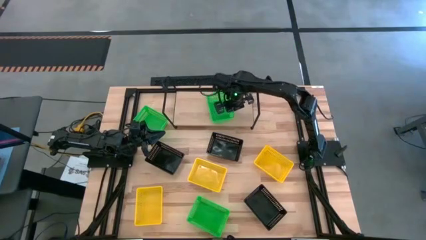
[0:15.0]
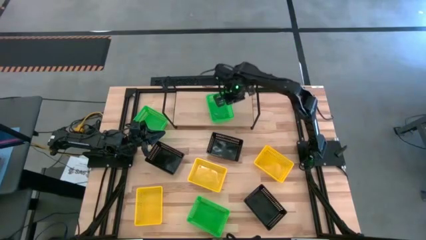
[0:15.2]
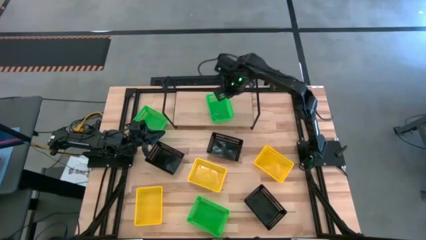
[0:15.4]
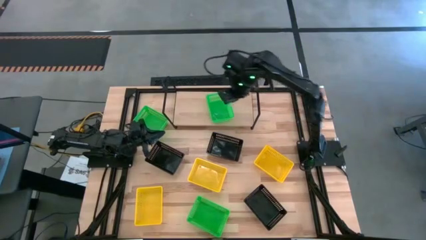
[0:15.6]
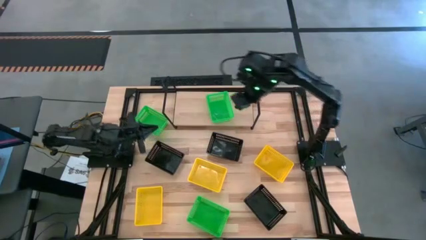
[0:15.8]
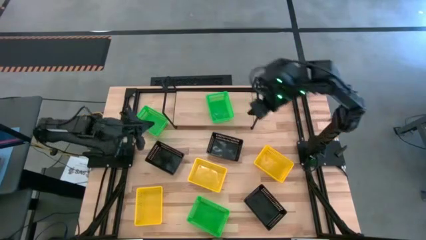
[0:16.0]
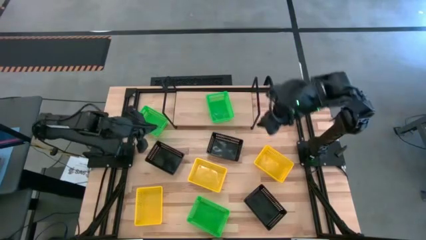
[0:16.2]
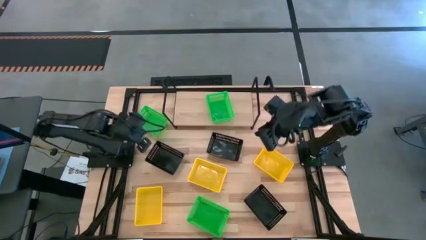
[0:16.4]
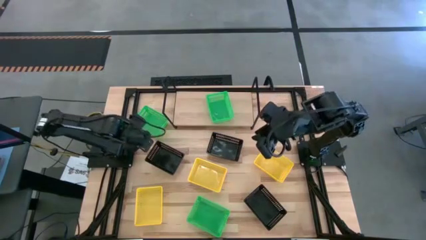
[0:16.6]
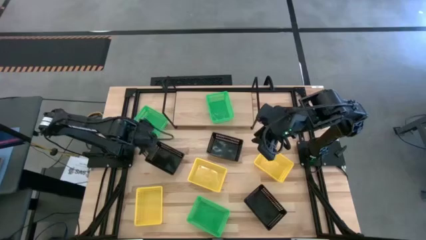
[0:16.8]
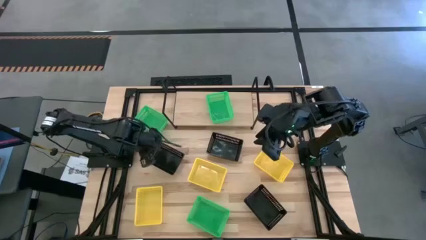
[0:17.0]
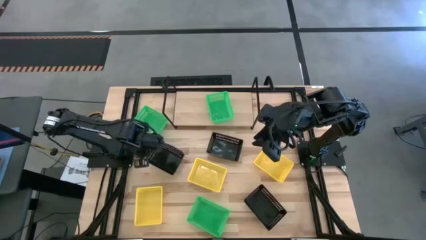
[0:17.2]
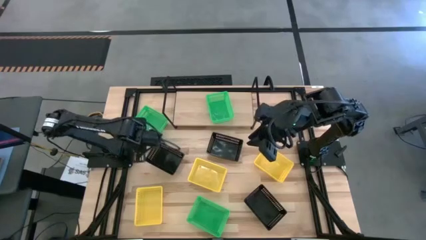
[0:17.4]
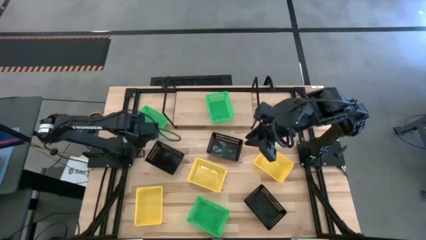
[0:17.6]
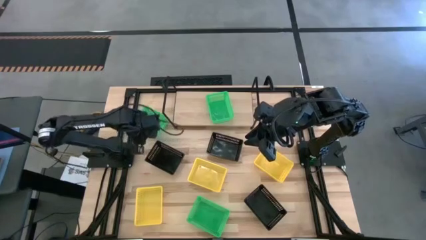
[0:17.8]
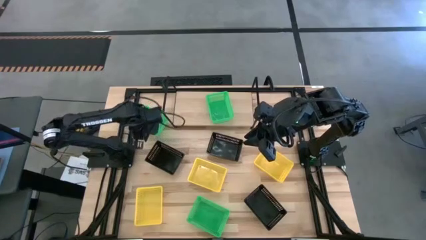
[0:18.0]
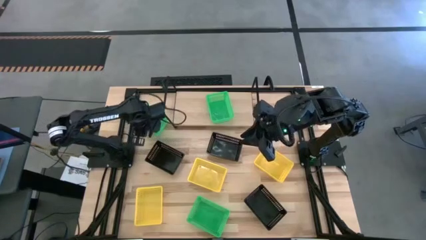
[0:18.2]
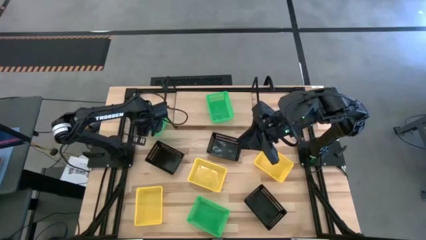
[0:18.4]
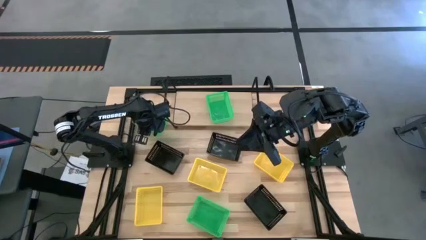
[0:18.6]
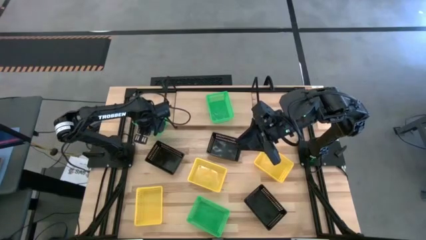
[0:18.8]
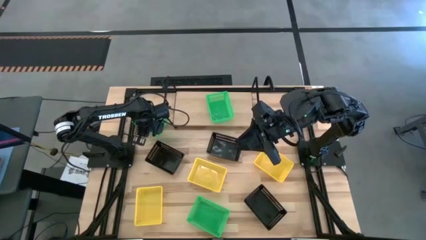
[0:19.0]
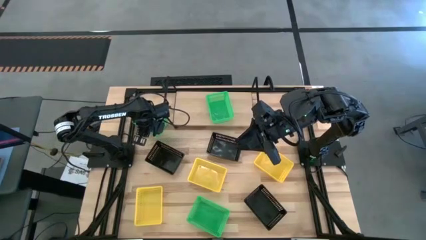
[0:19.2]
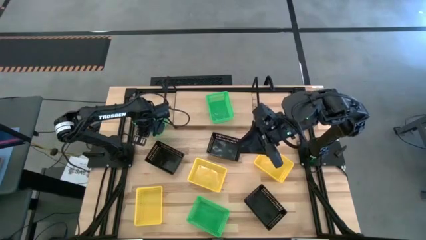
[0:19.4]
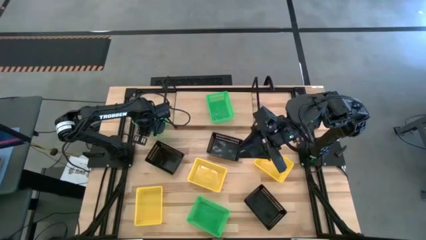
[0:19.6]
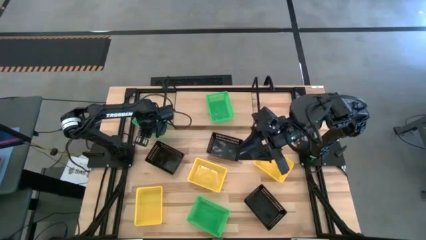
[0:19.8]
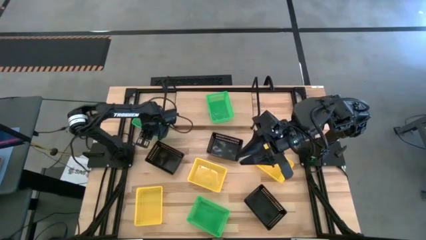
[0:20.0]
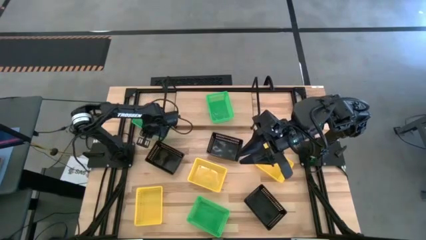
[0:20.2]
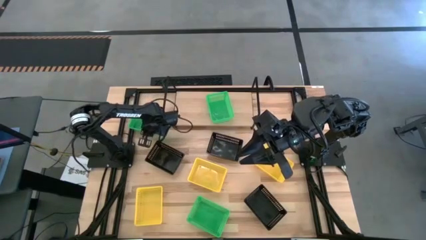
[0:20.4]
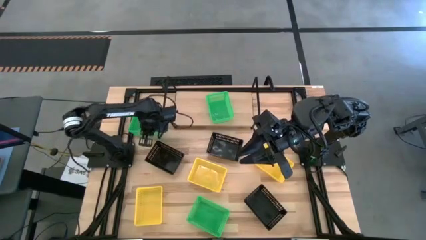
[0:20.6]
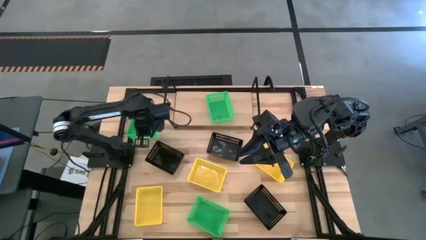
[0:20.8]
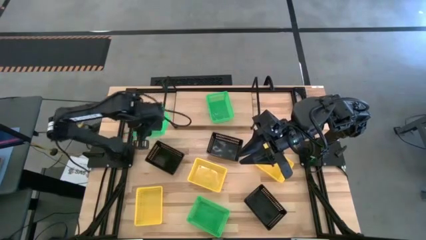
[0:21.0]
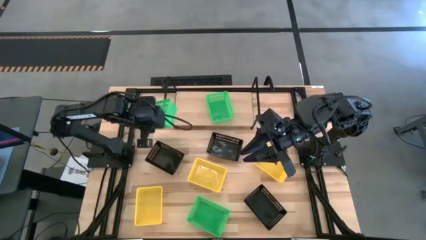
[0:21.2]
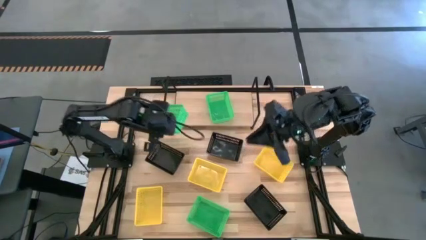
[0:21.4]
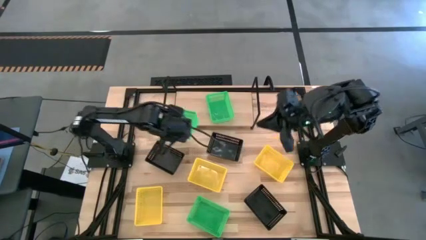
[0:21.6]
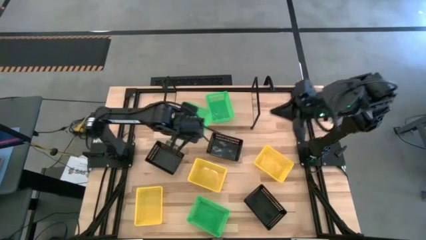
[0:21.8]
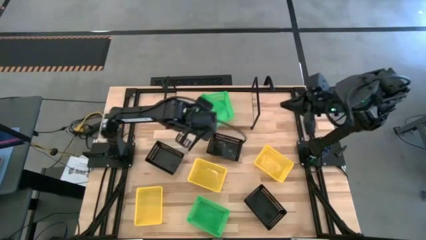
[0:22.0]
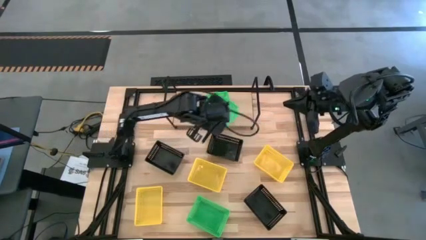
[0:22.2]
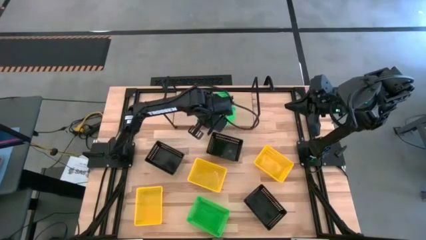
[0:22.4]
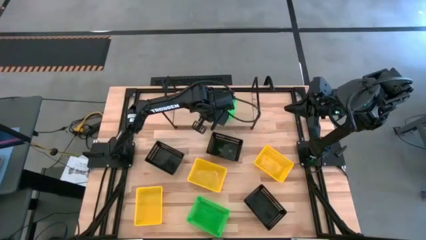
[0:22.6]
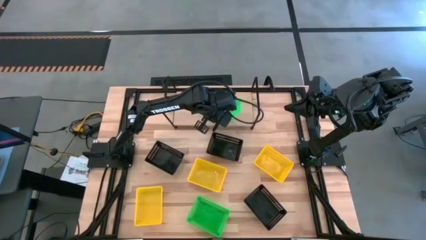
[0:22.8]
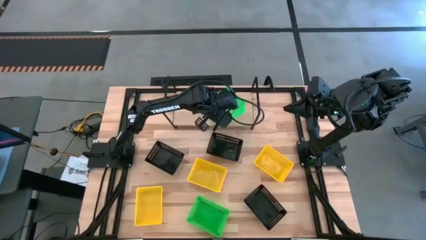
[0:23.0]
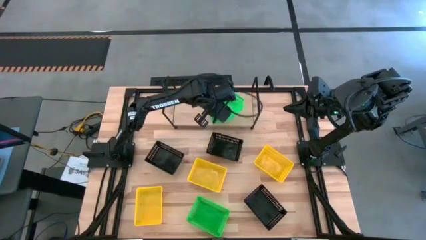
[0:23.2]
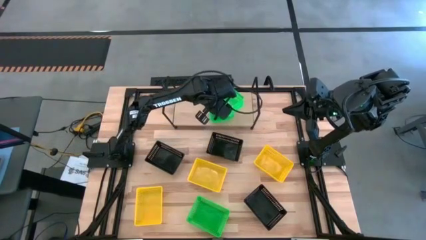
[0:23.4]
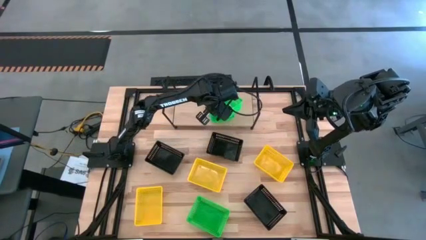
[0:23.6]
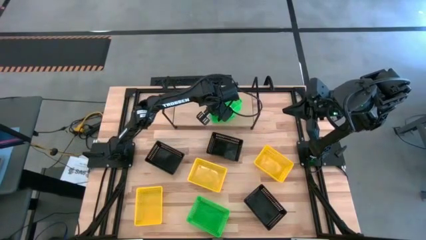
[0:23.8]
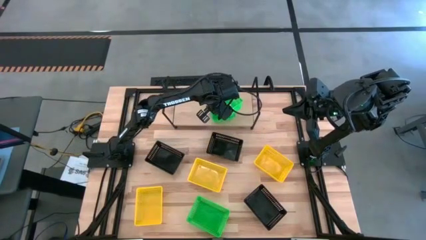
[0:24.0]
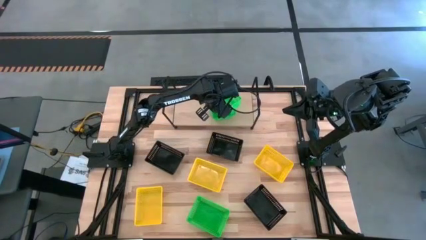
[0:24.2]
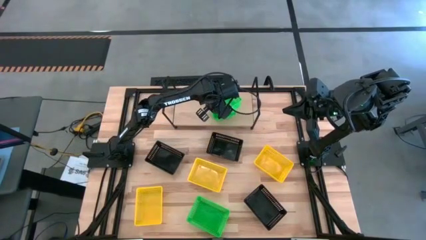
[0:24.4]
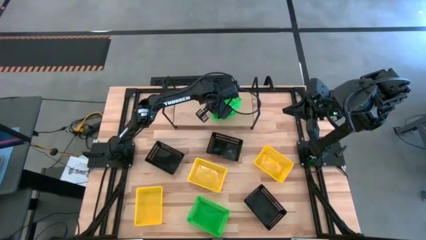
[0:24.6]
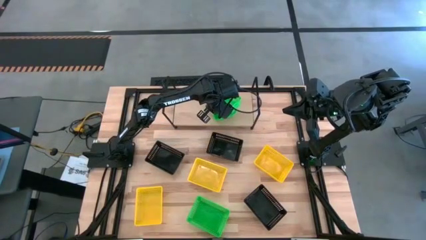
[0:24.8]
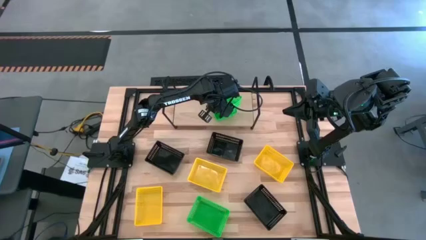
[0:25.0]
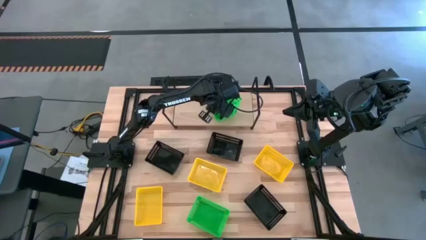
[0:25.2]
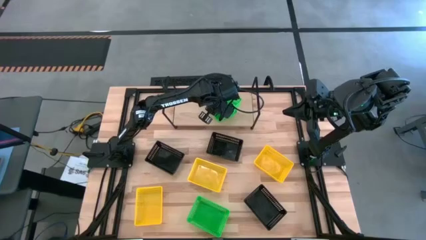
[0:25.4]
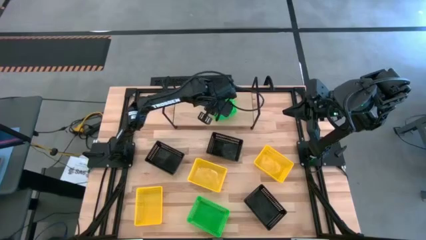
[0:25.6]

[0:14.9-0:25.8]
Task: Stack baskets on shelf by color
Stack the top green bin on top of the green bin

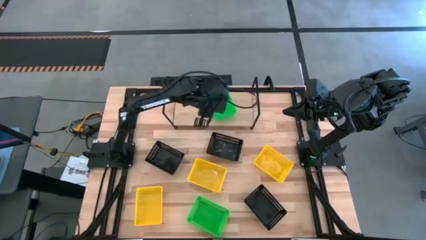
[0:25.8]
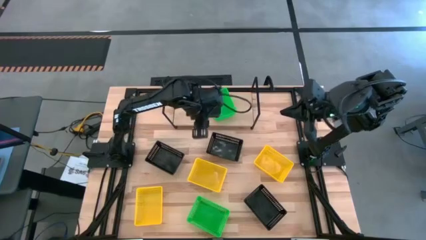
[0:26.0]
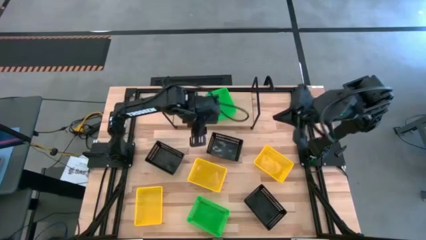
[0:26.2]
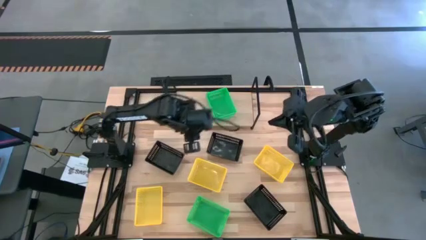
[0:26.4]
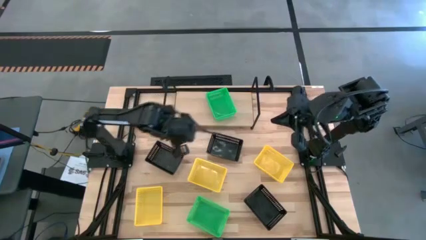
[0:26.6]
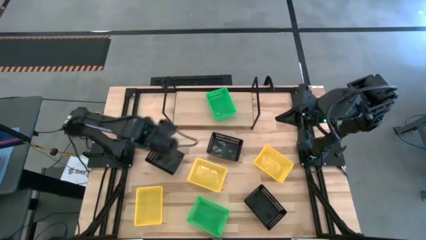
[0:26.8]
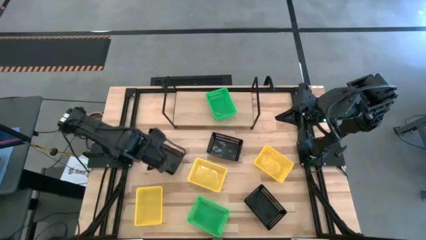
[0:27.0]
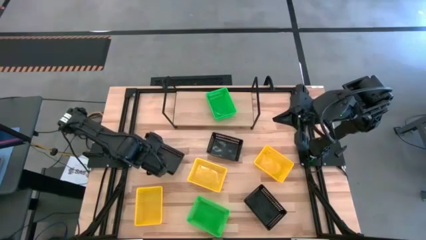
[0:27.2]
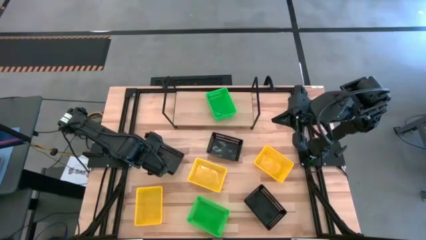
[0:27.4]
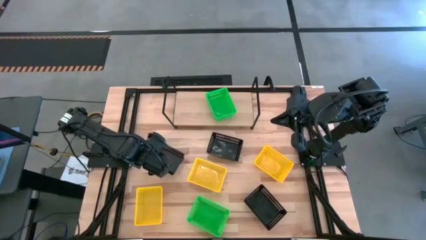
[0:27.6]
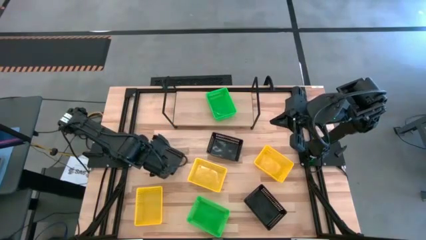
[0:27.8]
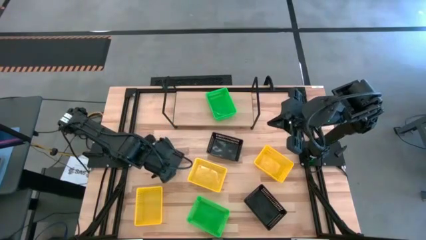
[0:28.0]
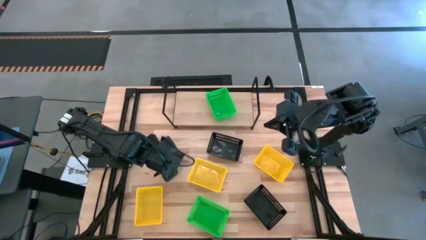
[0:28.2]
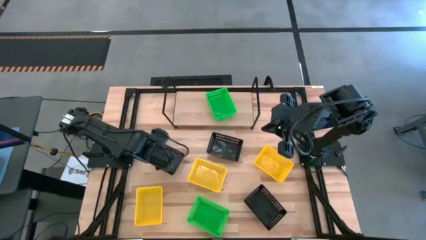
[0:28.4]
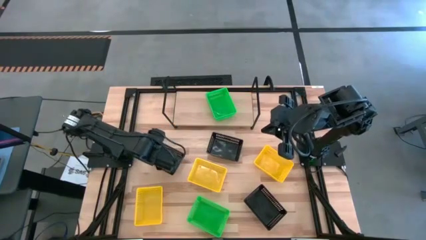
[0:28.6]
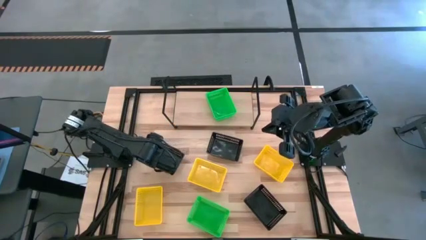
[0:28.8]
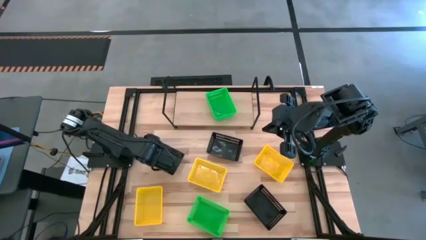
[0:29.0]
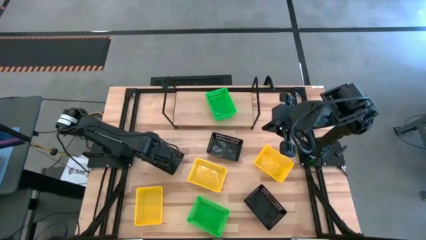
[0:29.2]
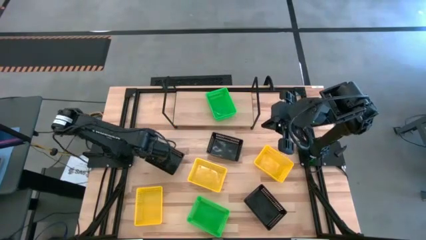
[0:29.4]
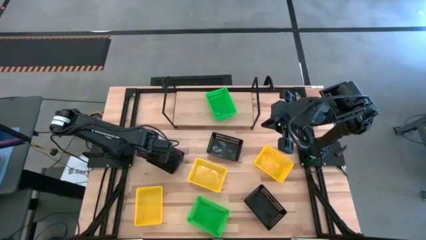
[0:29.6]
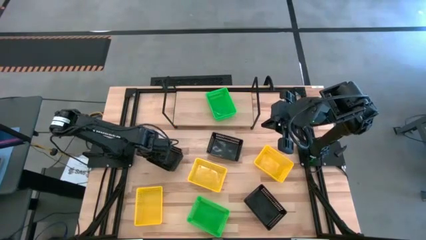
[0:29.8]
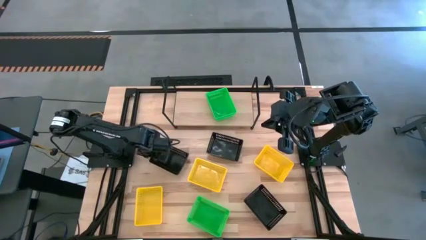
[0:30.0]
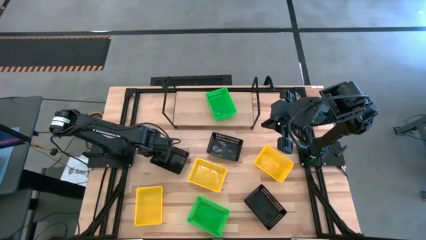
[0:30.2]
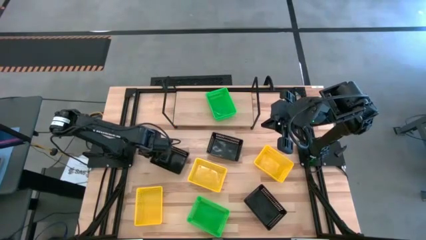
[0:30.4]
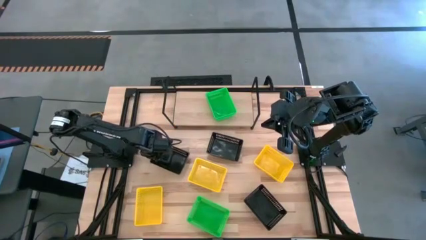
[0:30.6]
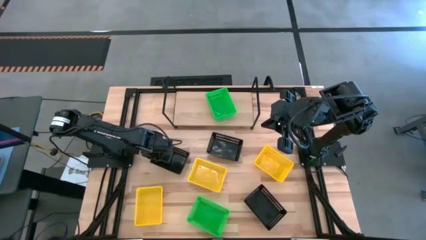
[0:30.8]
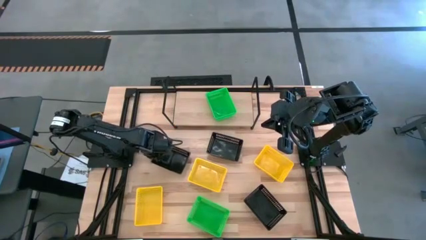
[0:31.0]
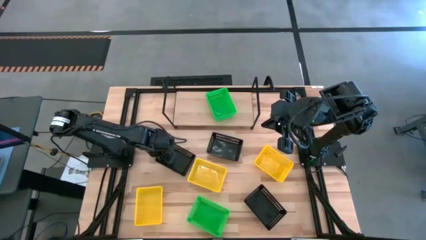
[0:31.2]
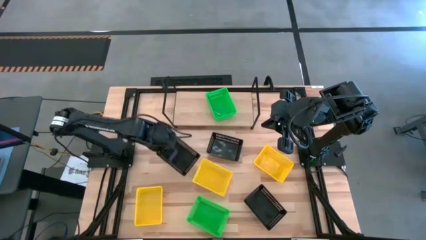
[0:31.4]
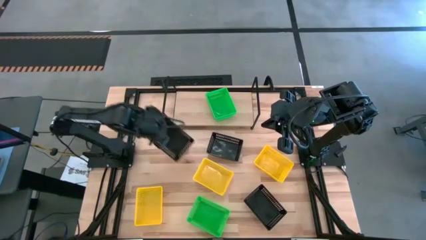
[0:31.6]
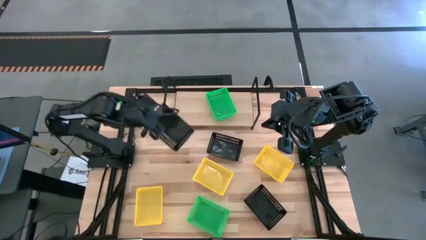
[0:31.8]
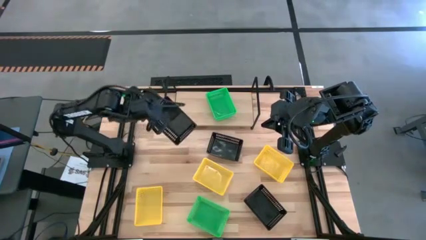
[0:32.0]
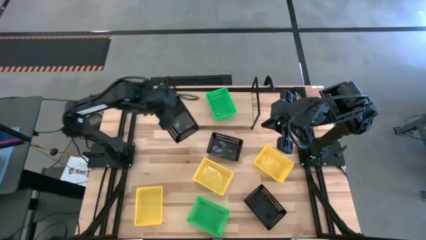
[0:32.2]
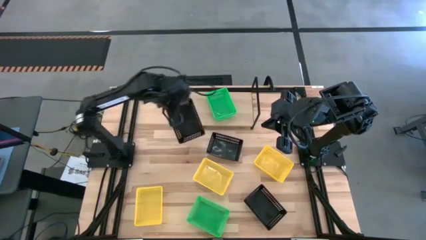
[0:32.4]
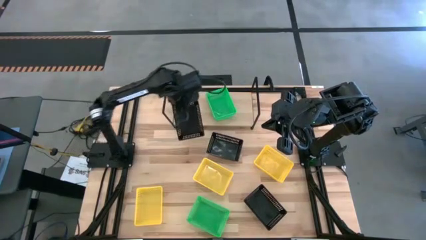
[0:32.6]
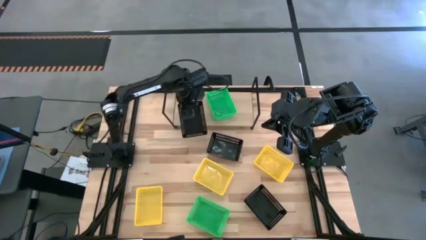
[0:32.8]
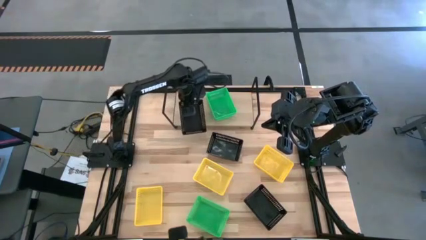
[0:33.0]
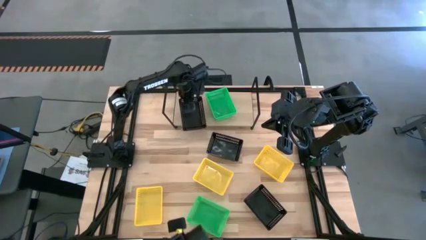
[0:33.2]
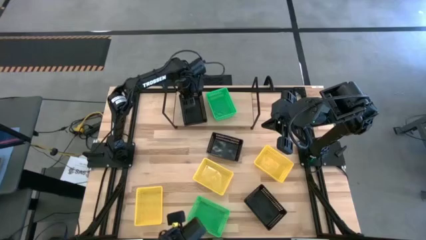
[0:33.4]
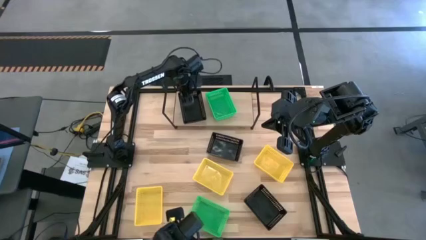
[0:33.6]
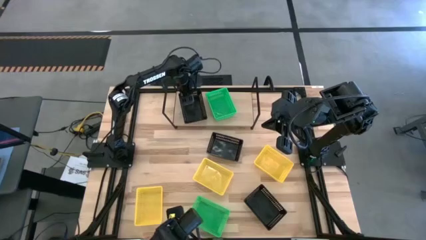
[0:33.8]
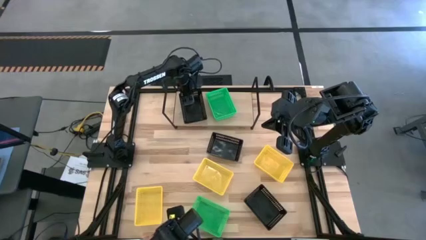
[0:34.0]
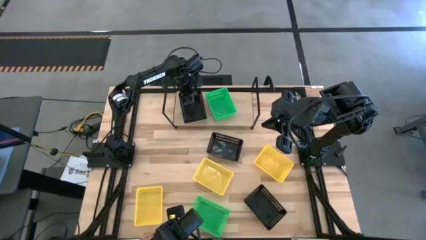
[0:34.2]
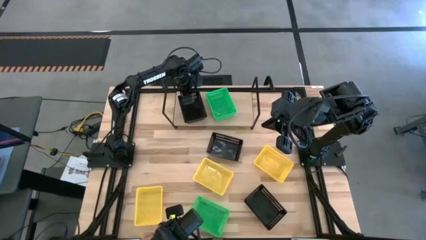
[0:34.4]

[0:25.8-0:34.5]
Put the top left black bin on the shelf
